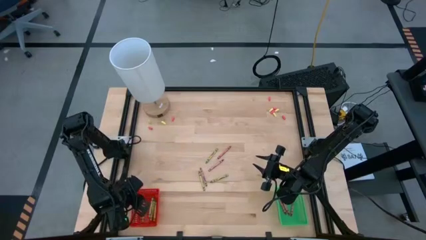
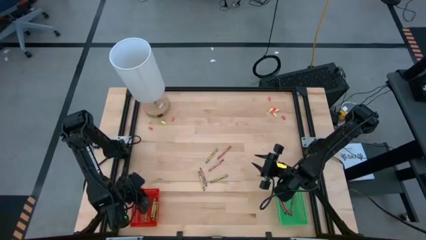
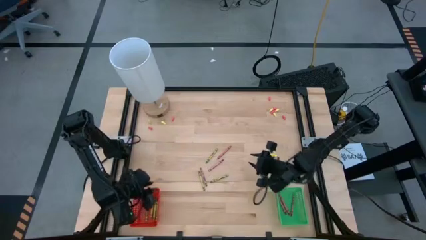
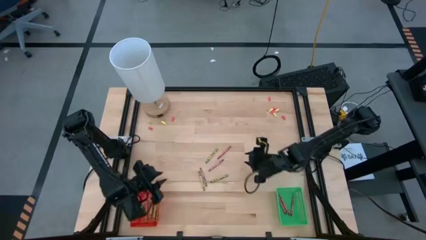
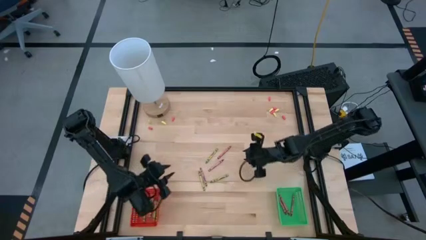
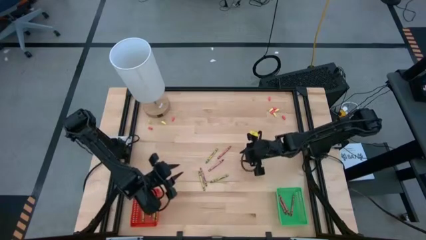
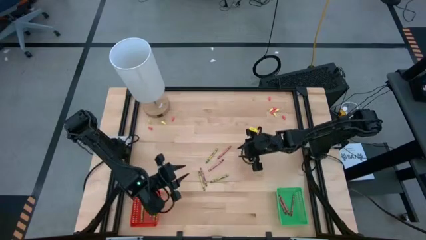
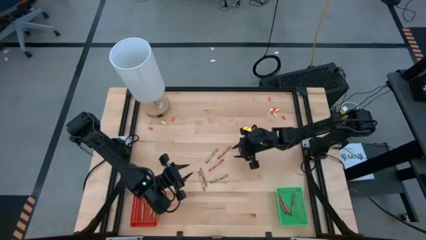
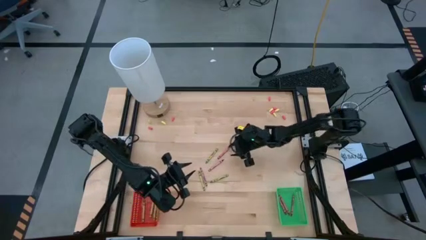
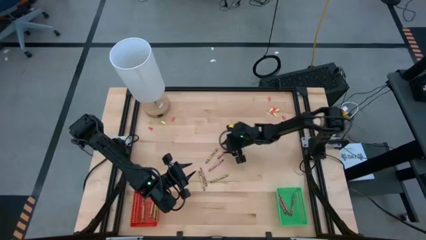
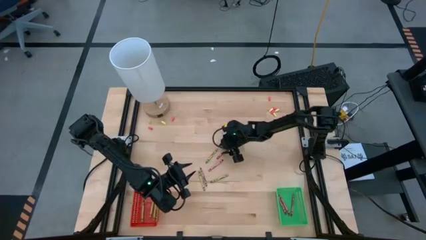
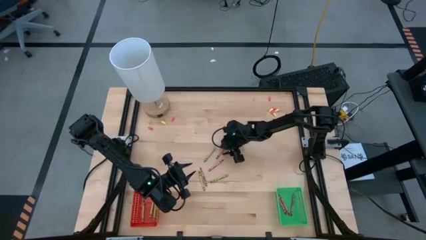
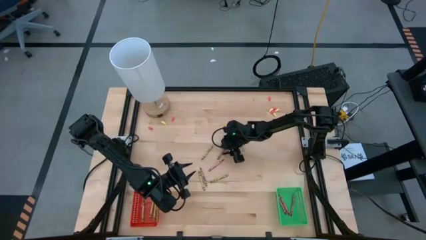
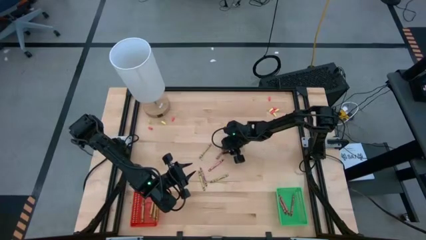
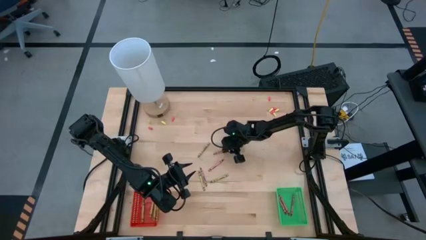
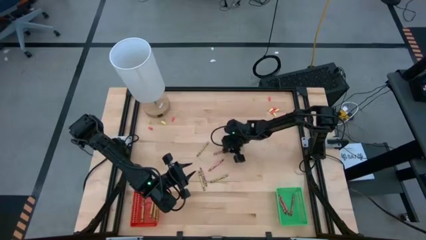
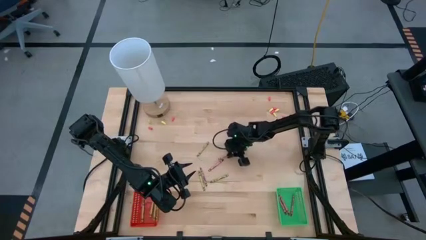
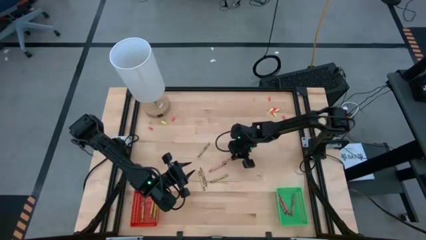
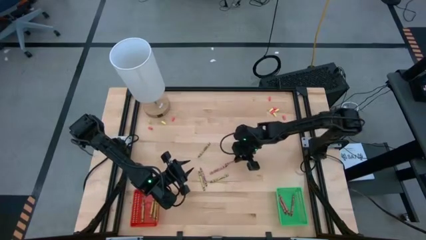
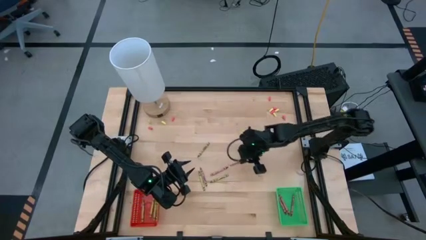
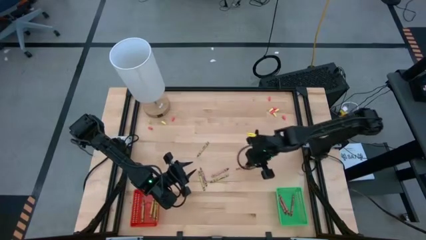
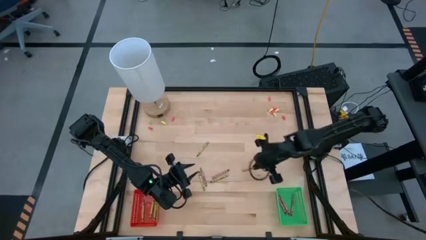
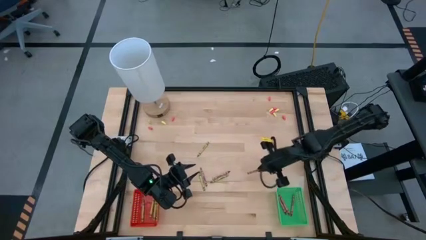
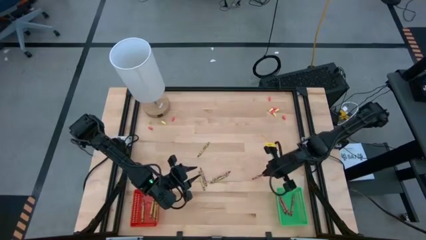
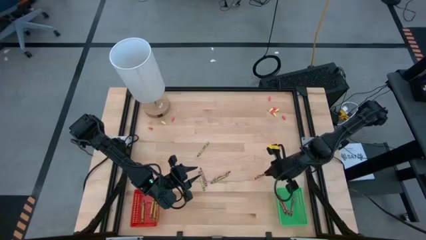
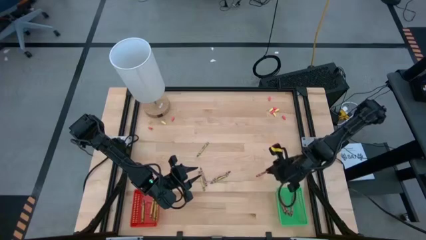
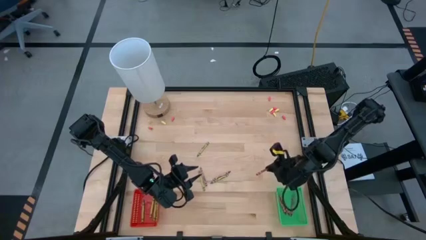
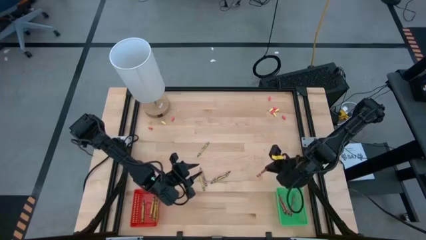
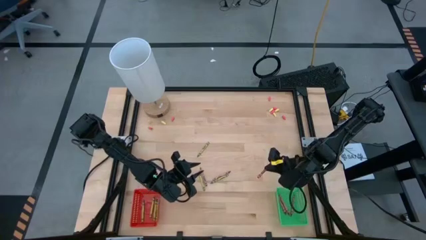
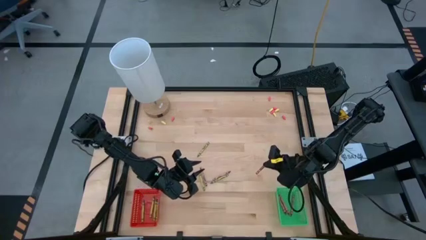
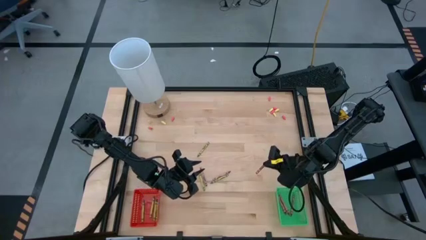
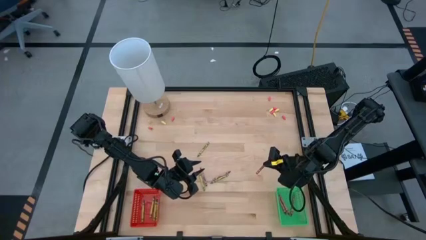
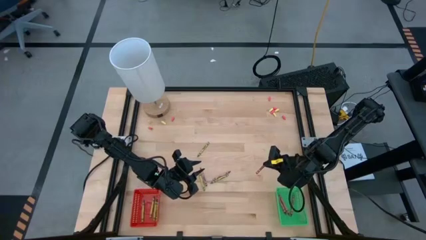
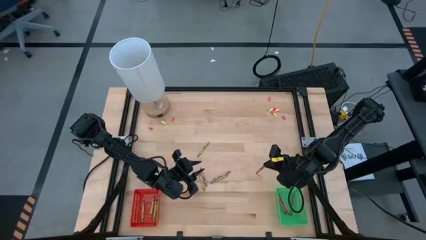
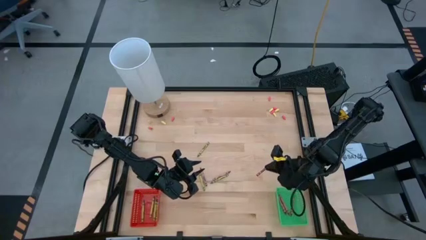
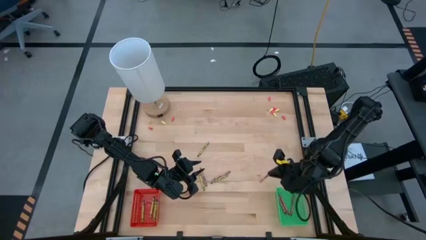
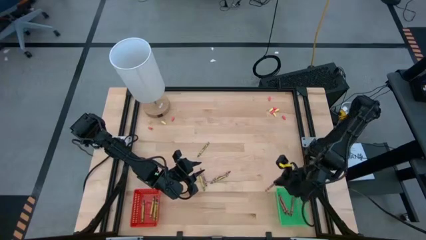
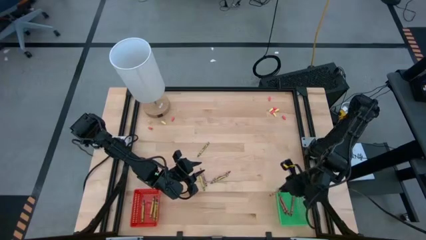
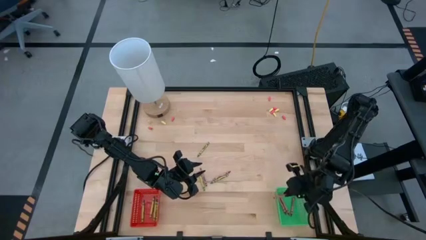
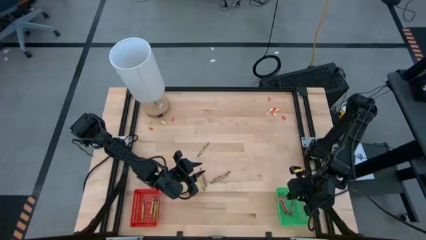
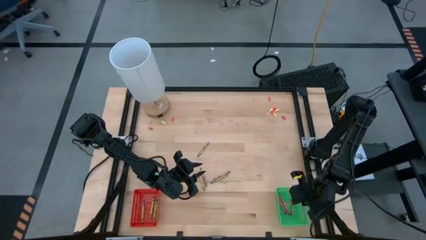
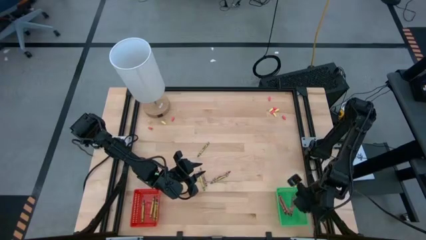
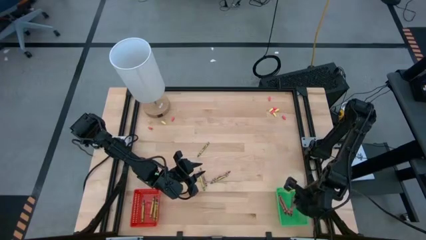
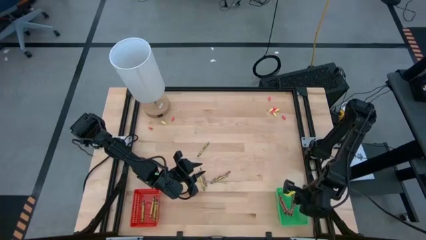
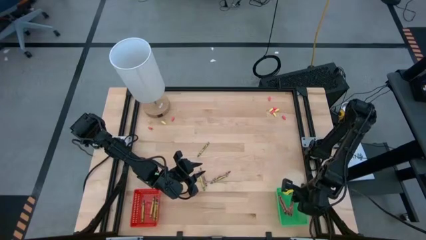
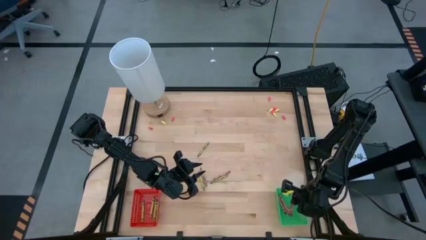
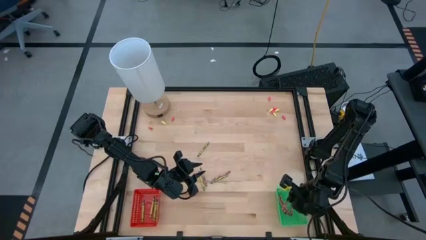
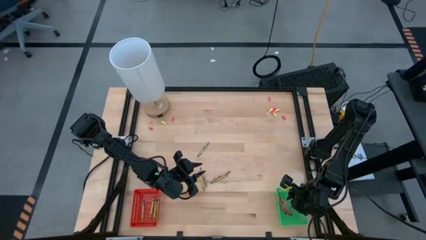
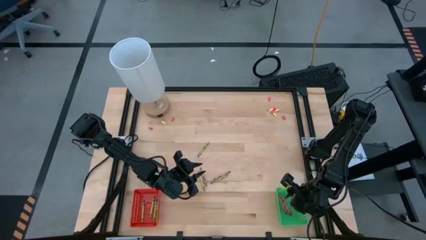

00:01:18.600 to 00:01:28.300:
Task: Sort crayons
Put the red crayon into the green bin
